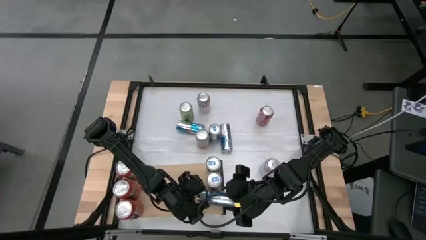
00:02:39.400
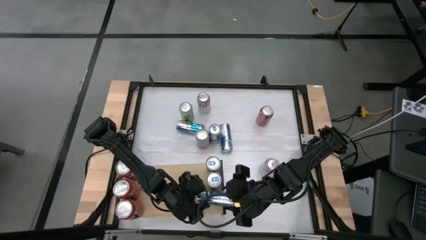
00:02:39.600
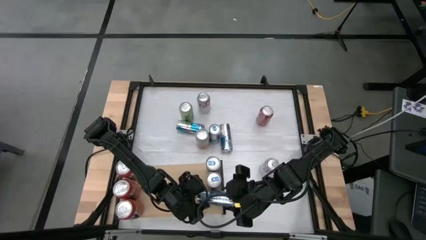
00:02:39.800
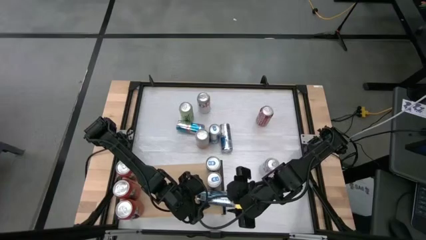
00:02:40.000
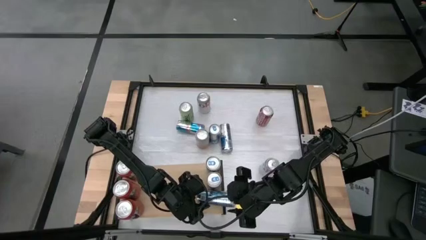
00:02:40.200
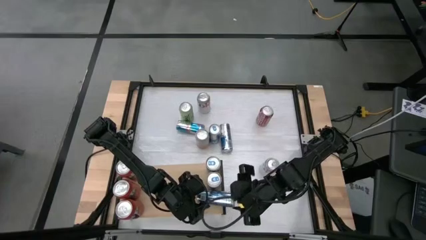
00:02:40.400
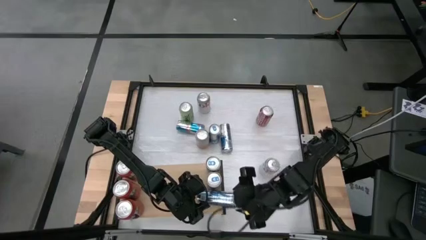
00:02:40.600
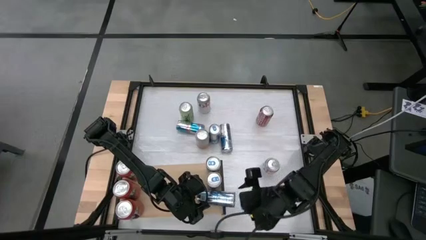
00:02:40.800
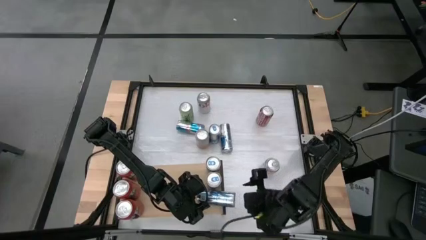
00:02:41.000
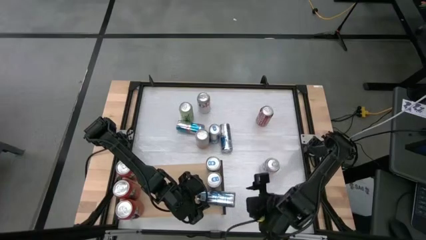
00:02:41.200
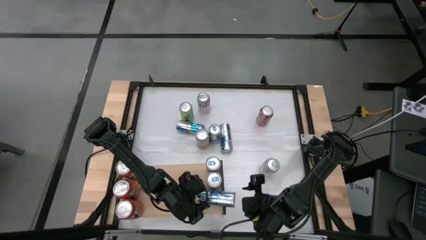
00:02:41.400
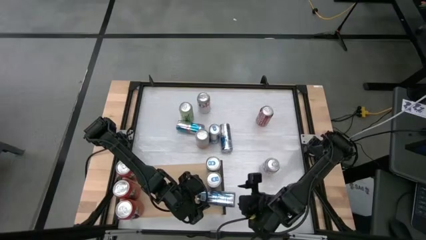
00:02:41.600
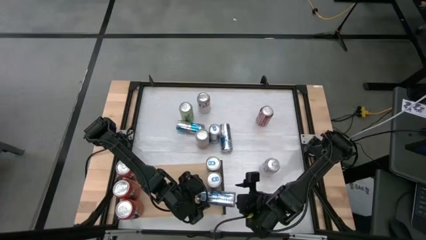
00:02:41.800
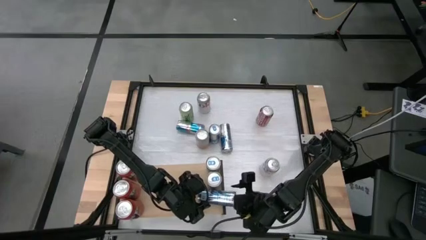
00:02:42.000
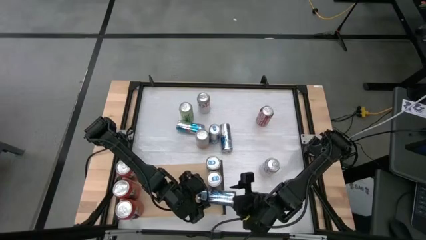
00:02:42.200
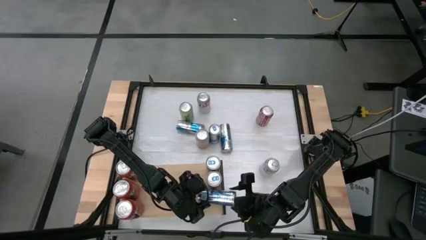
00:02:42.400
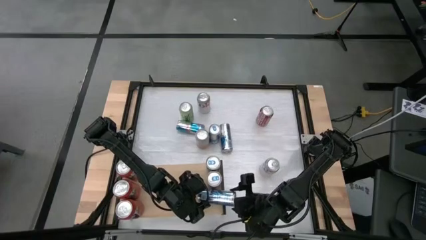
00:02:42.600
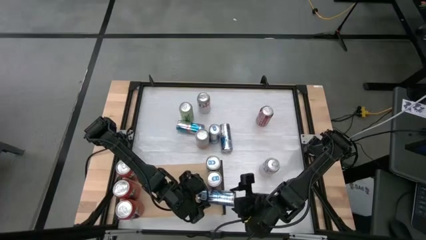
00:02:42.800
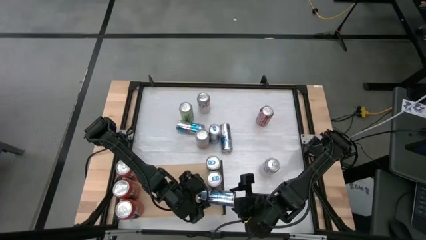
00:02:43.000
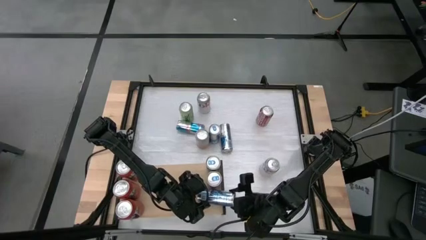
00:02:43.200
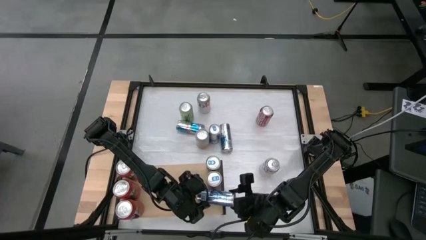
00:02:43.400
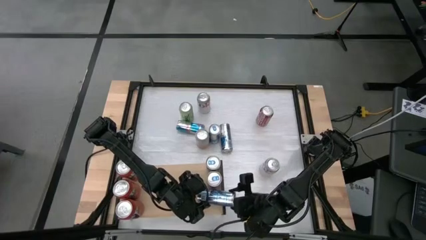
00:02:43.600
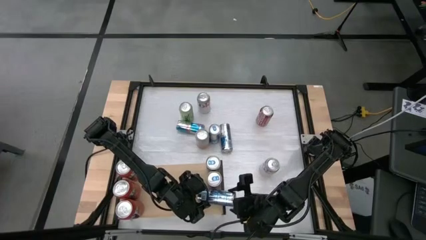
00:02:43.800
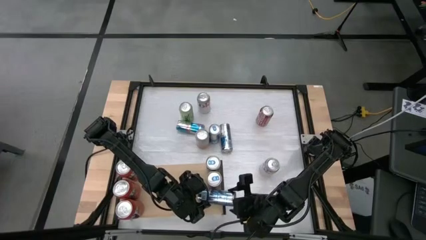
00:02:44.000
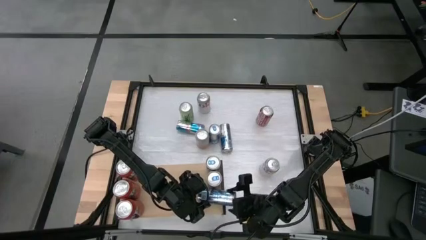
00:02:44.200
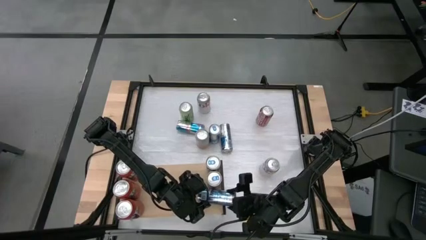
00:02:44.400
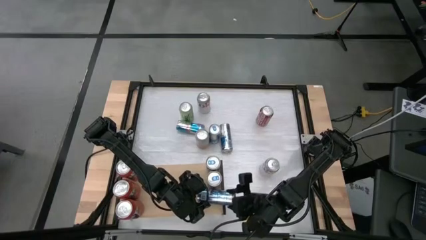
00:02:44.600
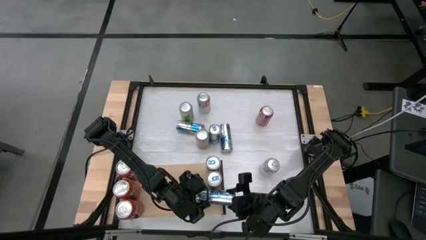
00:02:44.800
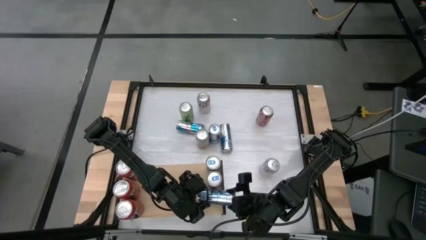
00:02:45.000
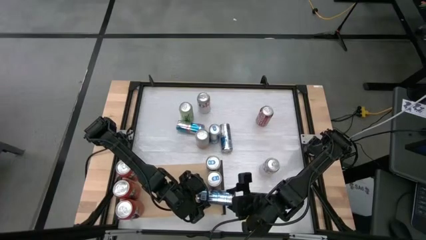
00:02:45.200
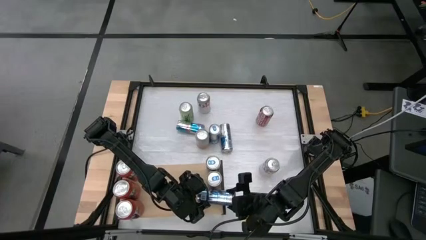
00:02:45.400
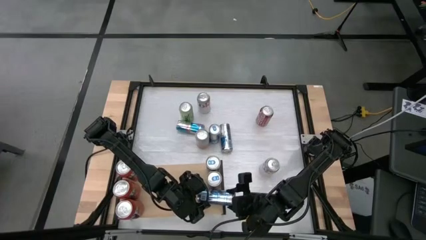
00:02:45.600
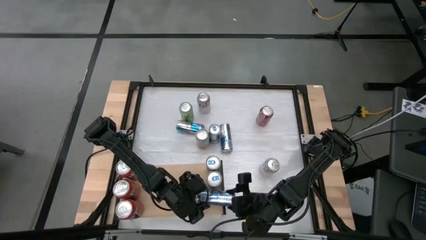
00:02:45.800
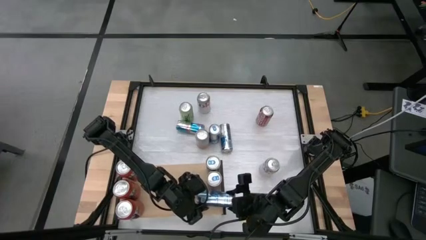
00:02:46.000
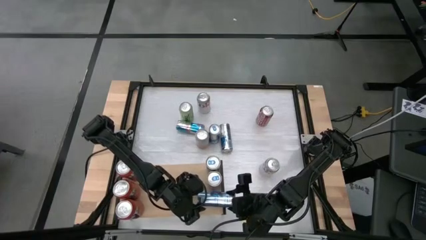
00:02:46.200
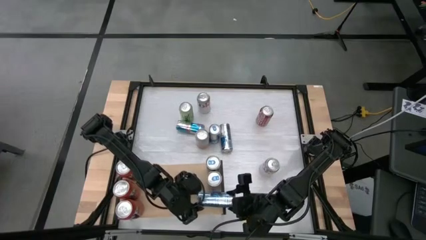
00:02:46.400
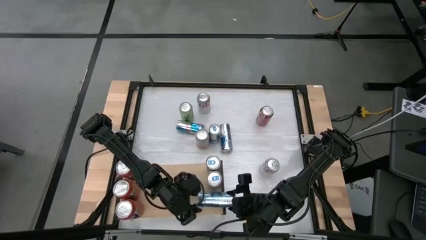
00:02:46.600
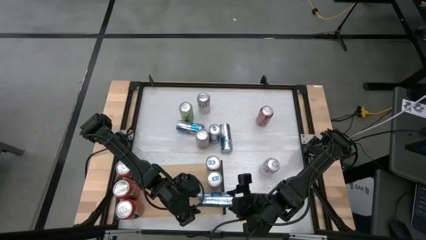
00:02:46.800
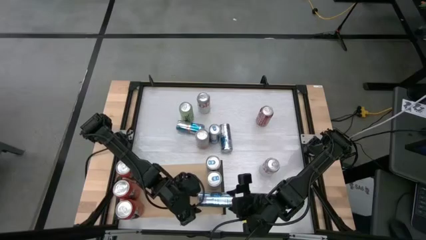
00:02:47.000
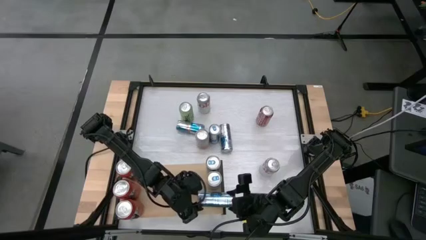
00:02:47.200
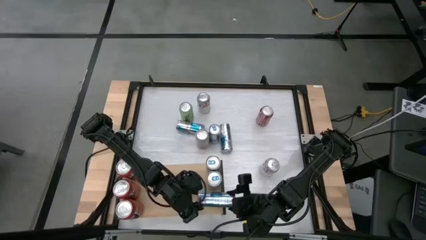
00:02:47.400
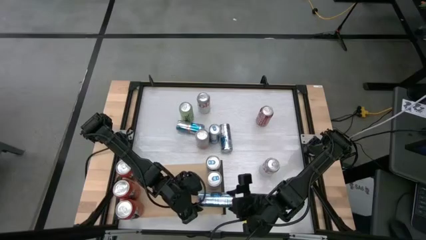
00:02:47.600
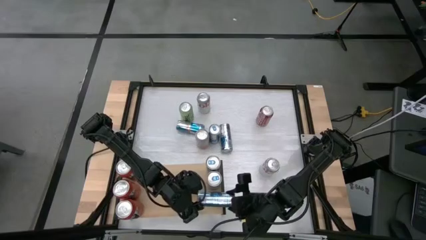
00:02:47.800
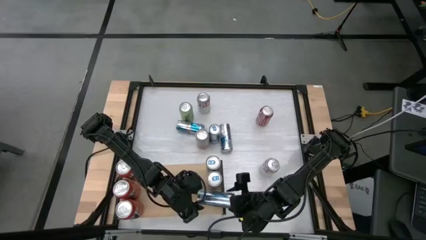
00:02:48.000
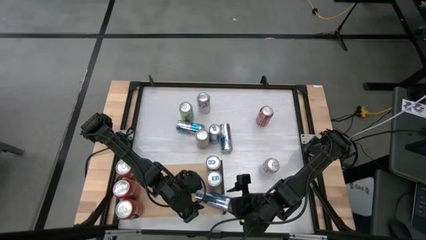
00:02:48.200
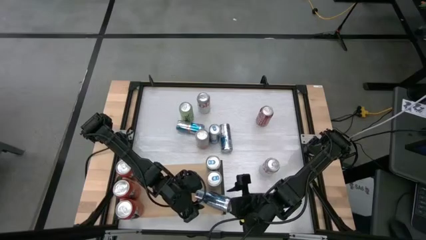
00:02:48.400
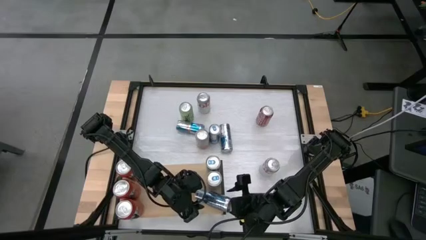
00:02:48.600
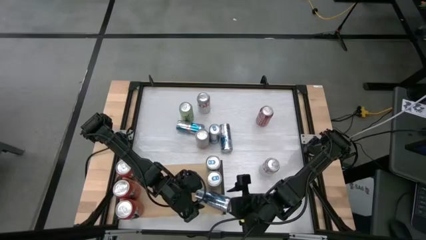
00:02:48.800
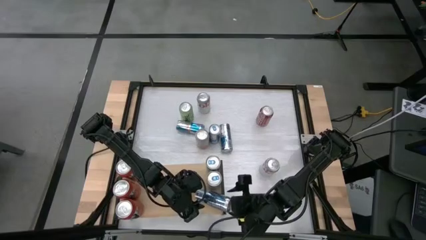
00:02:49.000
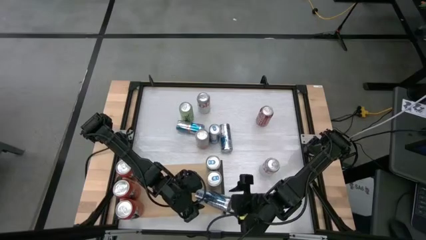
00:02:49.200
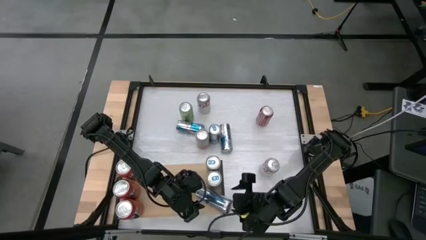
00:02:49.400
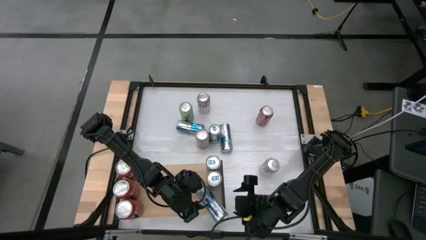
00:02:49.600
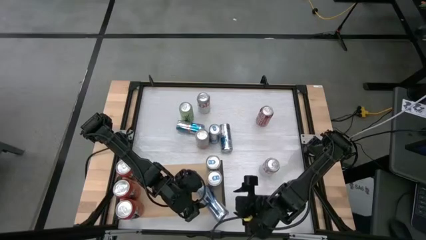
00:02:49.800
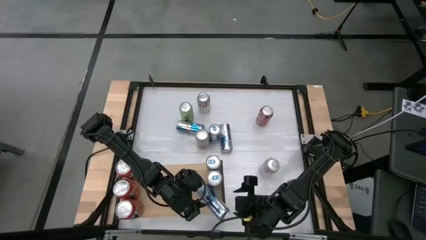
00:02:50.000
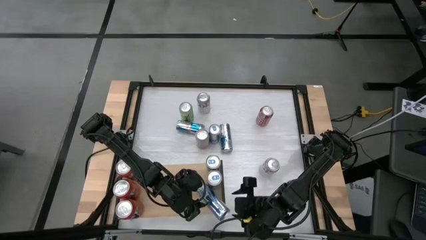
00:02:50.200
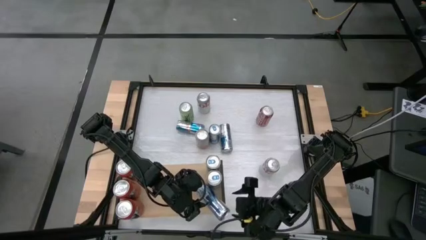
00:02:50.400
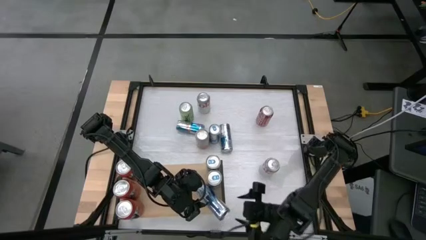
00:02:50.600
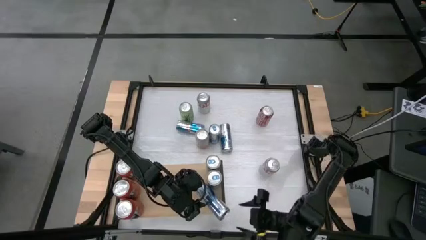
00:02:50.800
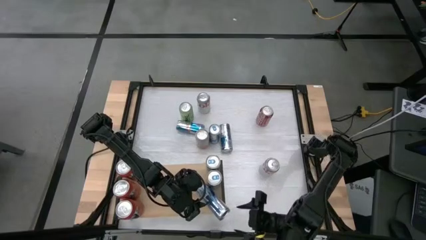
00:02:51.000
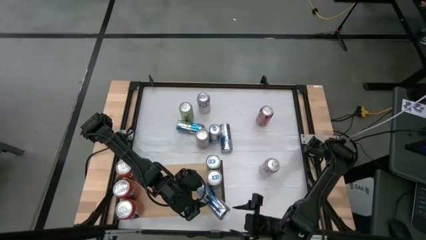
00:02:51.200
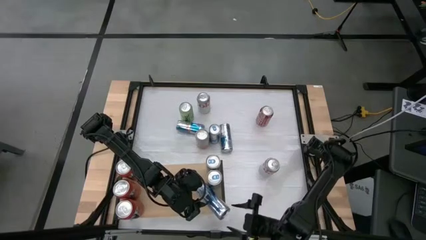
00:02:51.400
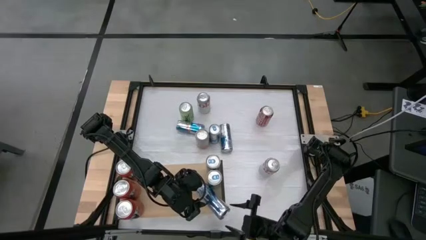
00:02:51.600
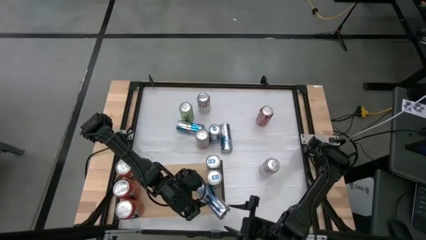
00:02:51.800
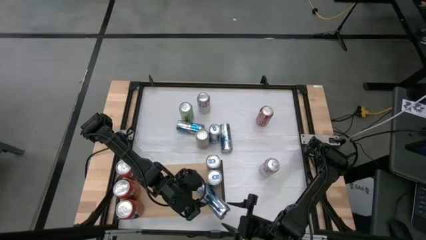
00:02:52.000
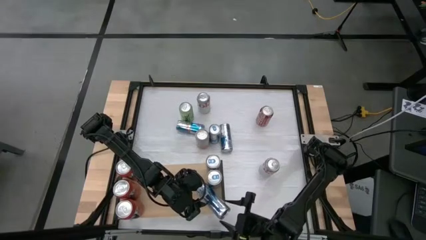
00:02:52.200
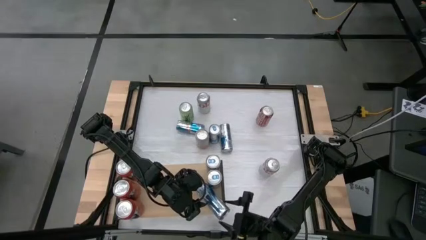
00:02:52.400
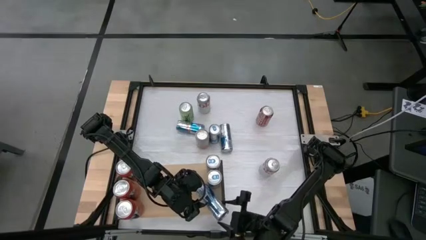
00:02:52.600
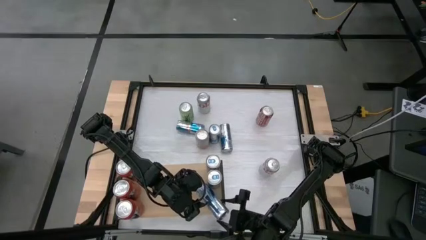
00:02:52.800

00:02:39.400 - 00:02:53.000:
Task: Place canned beverage on shelf
Put the blue soda can on the shelf aligned with the blue soda cans

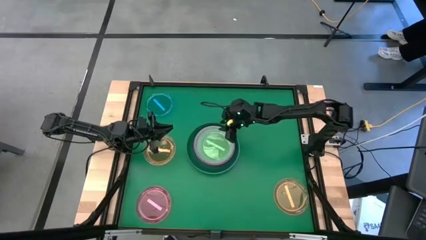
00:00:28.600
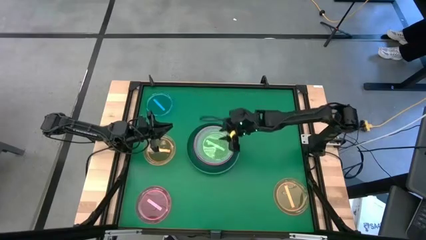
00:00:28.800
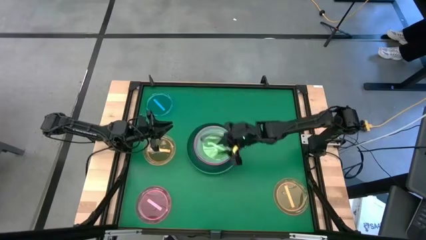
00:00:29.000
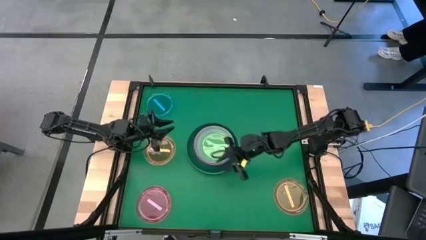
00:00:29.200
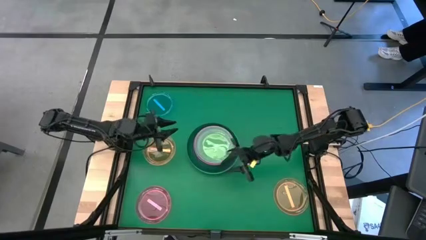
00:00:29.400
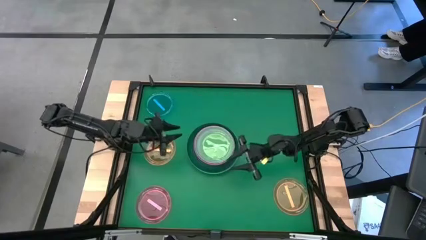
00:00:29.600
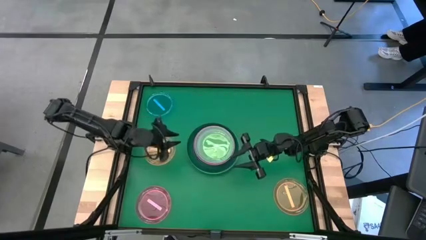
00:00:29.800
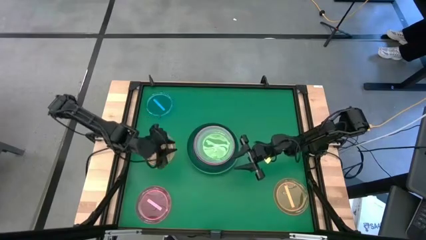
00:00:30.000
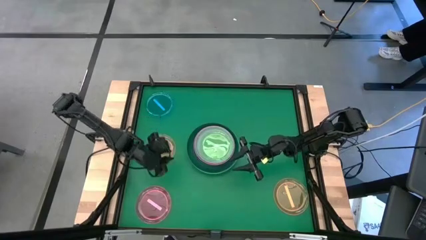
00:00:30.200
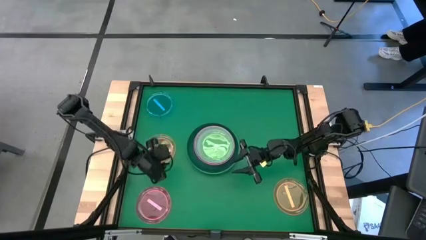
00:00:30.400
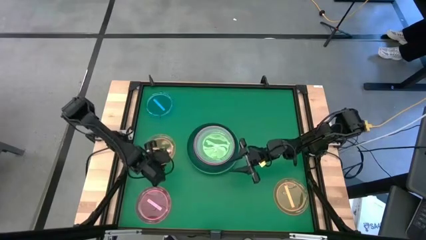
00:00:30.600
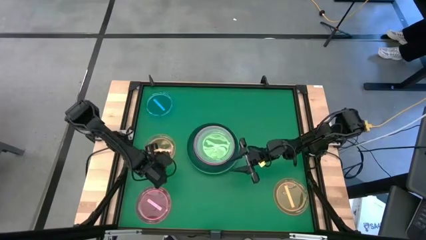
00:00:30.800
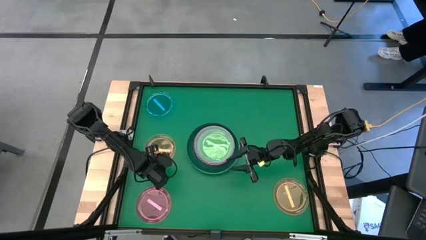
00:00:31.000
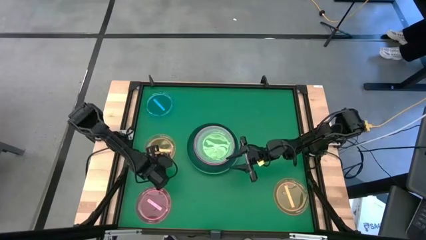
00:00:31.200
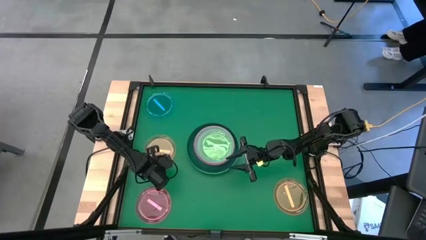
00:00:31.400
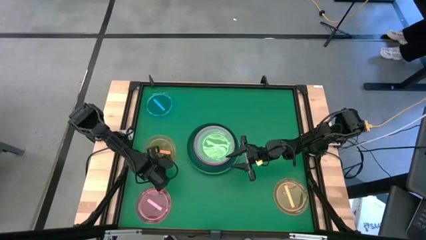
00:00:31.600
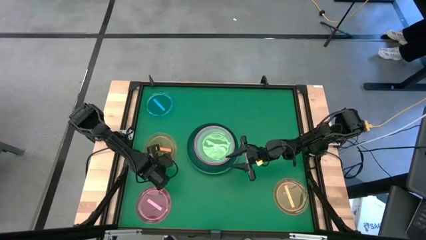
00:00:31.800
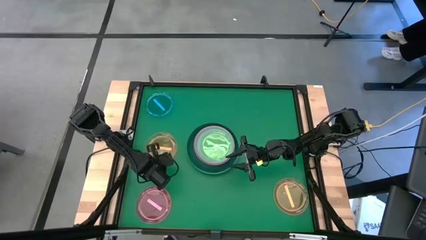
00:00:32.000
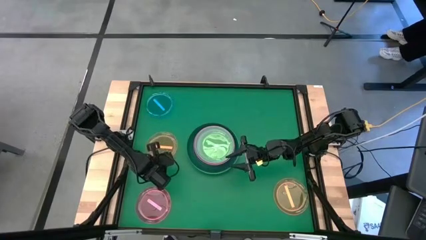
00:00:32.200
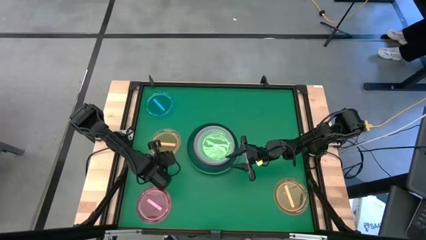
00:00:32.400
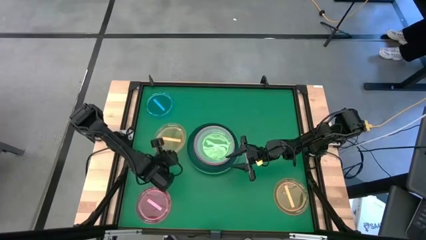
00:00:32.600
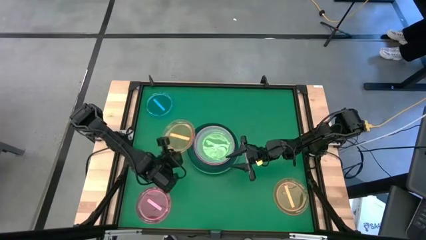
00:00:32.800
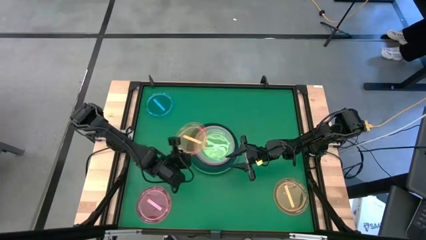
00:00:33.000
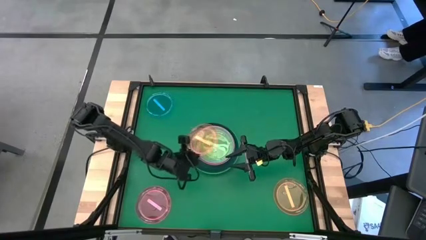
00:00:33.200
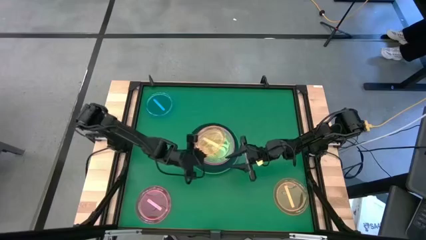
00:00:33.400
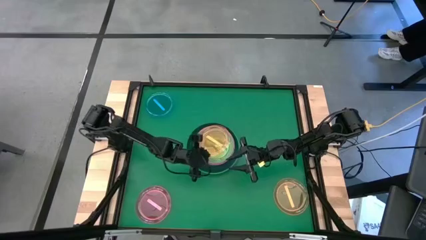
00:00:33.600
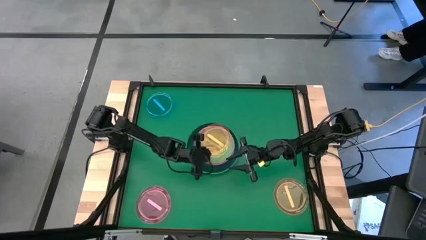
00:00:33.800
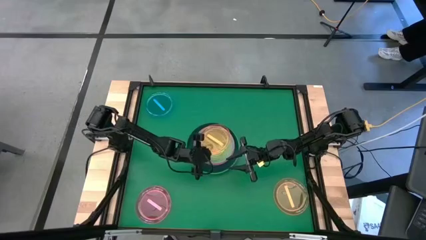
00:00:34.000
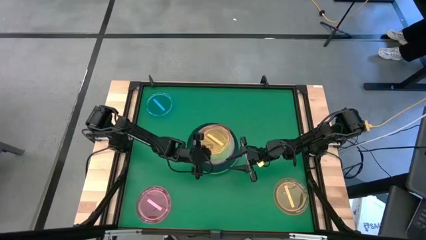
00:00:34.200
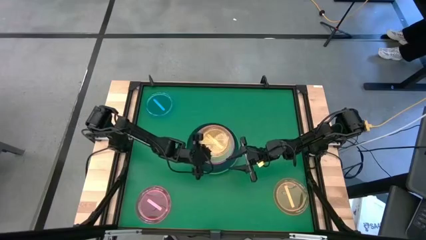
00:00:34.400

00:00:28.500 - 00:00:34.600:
Task: Stack plastic plates
Stack the left transparent orange plate on top of the transparent green plate
